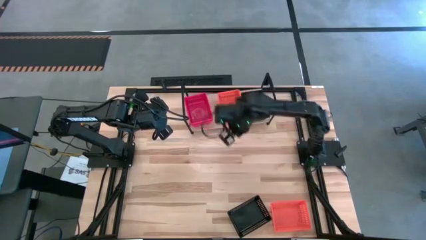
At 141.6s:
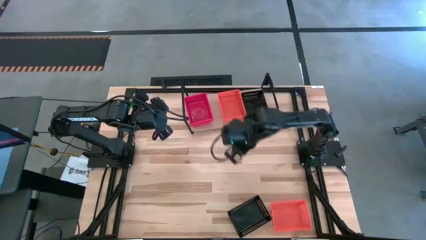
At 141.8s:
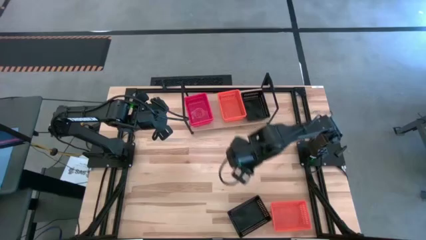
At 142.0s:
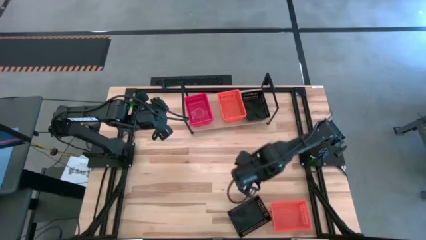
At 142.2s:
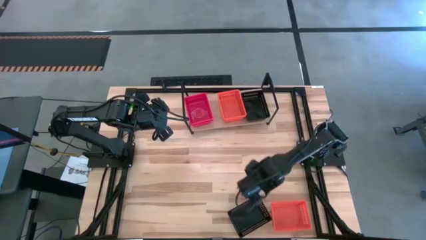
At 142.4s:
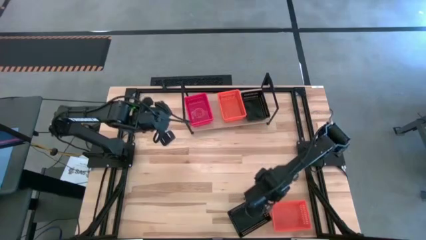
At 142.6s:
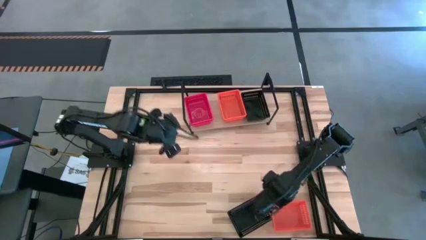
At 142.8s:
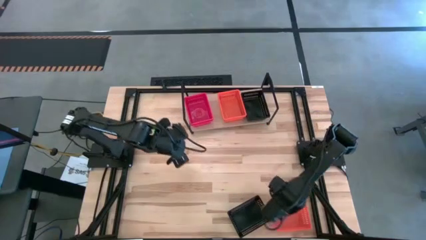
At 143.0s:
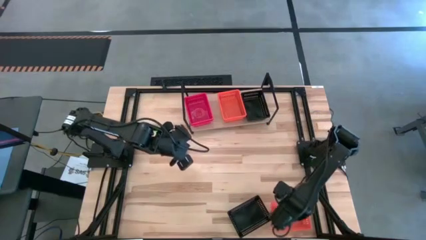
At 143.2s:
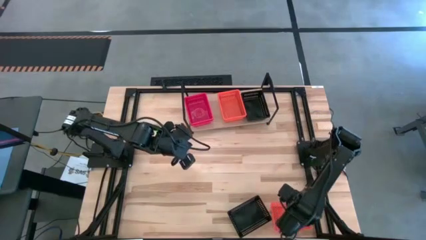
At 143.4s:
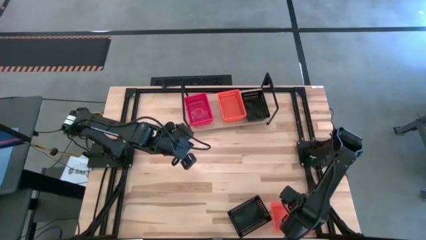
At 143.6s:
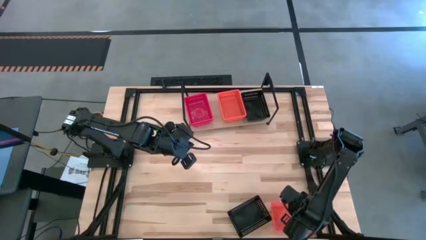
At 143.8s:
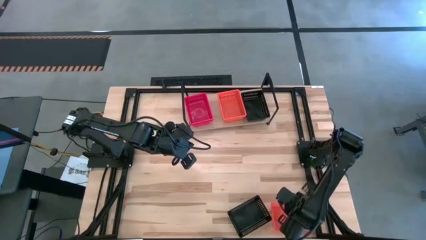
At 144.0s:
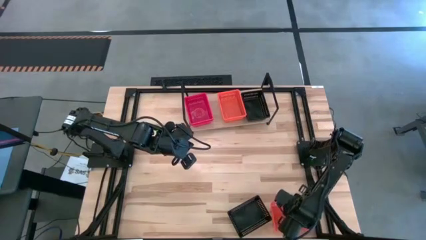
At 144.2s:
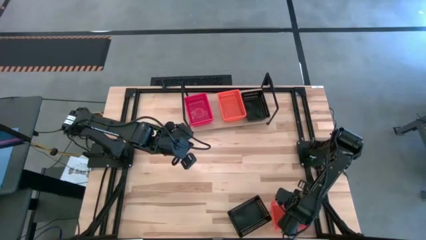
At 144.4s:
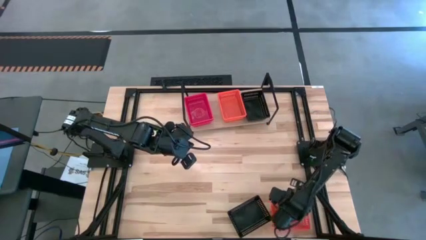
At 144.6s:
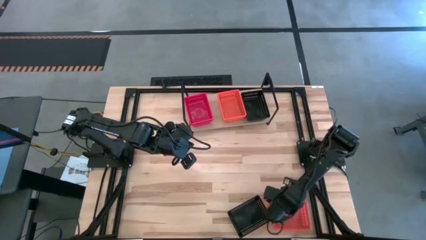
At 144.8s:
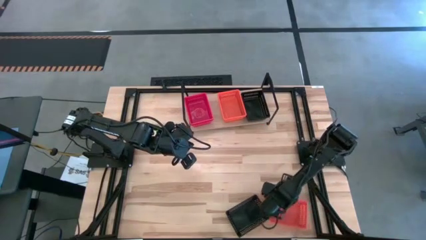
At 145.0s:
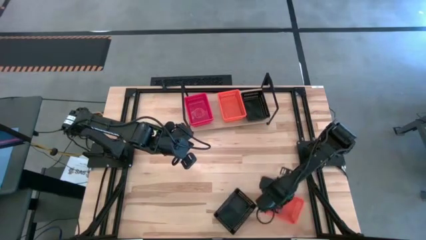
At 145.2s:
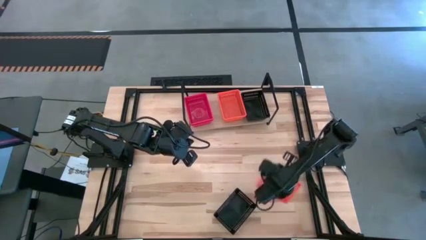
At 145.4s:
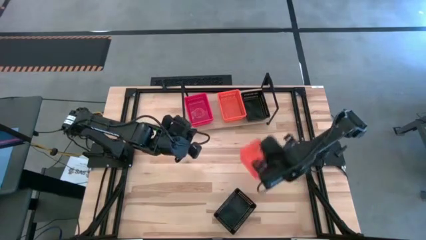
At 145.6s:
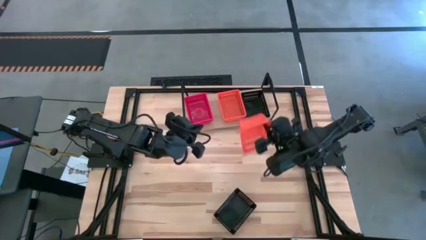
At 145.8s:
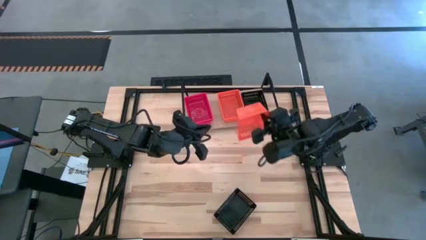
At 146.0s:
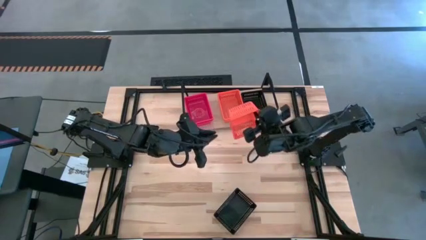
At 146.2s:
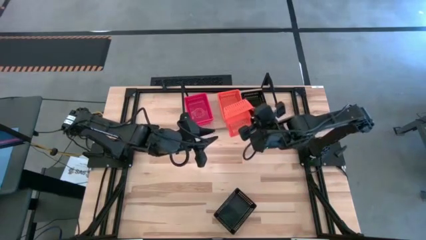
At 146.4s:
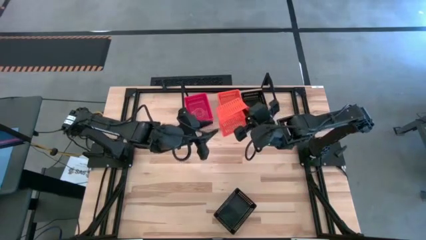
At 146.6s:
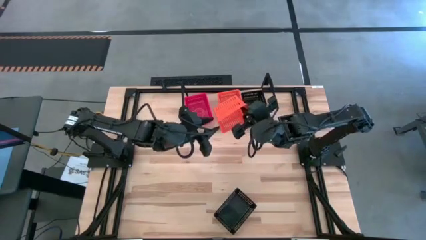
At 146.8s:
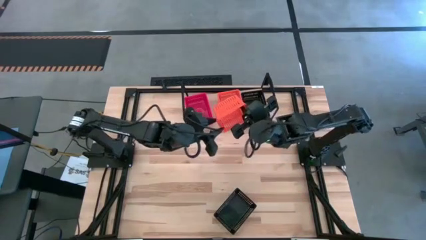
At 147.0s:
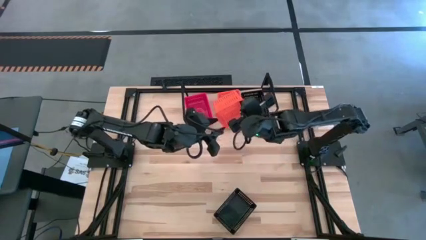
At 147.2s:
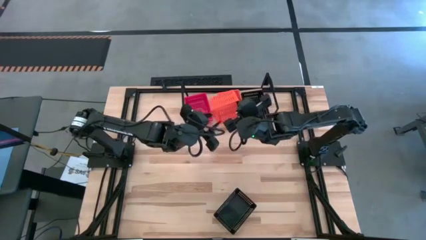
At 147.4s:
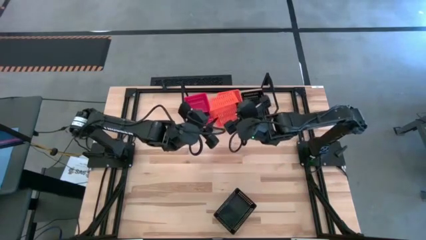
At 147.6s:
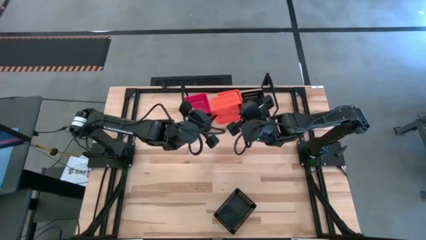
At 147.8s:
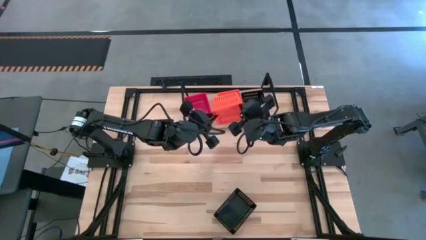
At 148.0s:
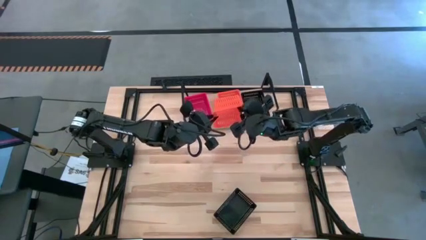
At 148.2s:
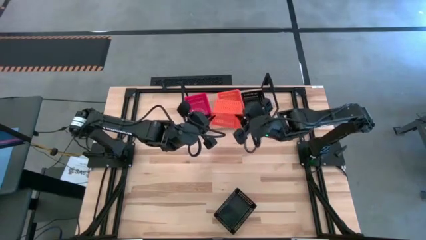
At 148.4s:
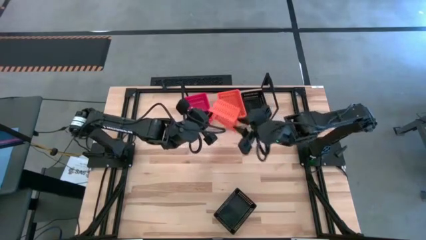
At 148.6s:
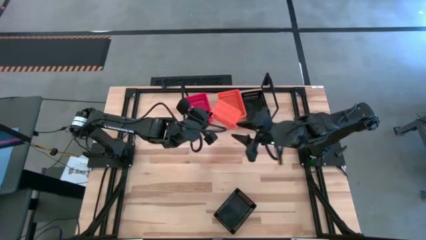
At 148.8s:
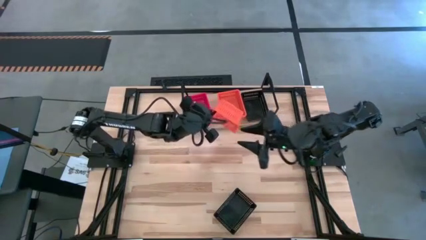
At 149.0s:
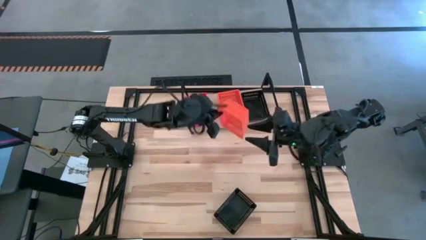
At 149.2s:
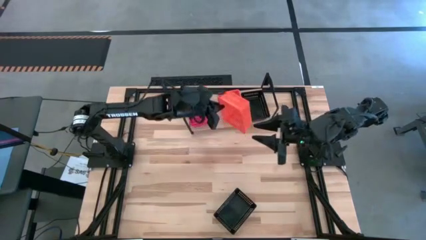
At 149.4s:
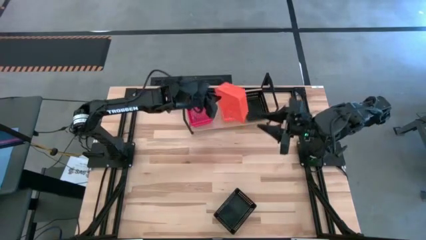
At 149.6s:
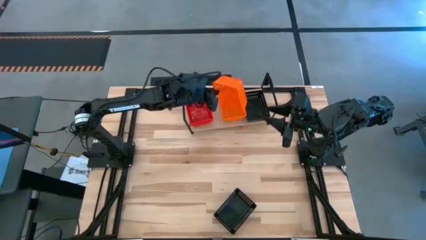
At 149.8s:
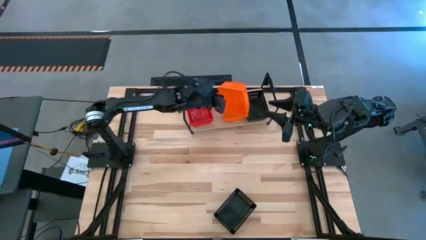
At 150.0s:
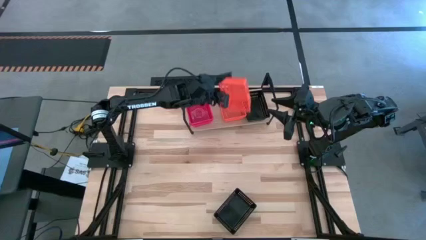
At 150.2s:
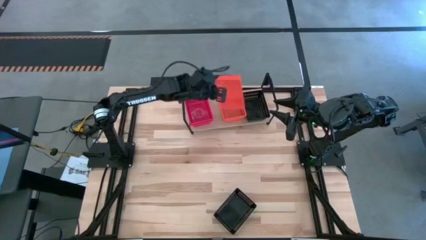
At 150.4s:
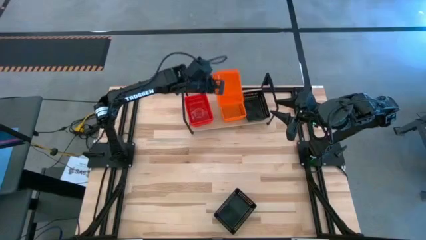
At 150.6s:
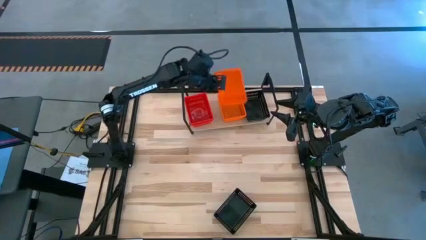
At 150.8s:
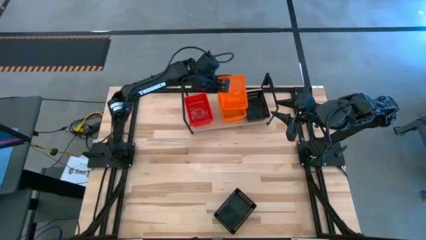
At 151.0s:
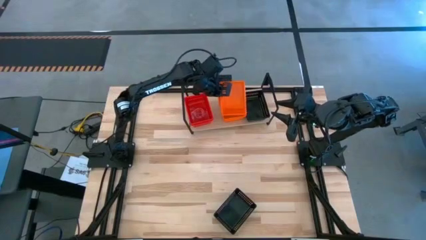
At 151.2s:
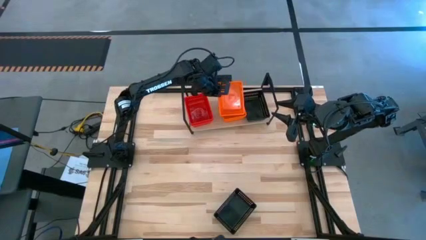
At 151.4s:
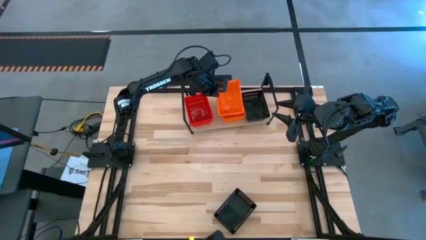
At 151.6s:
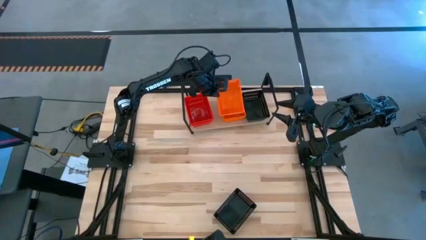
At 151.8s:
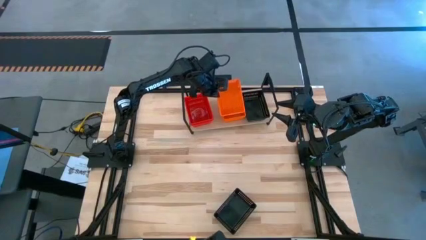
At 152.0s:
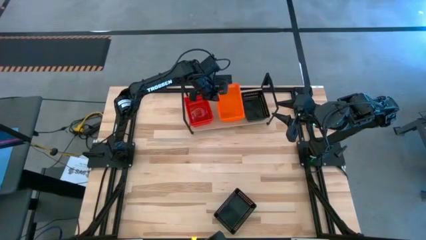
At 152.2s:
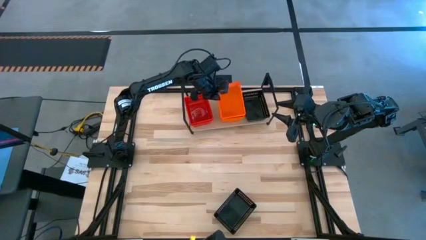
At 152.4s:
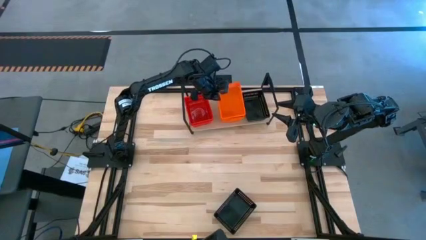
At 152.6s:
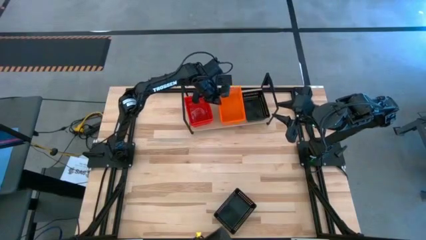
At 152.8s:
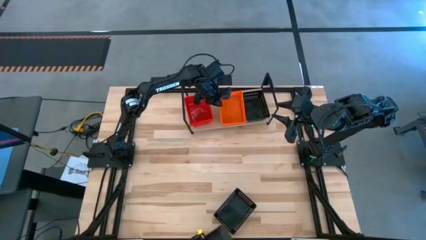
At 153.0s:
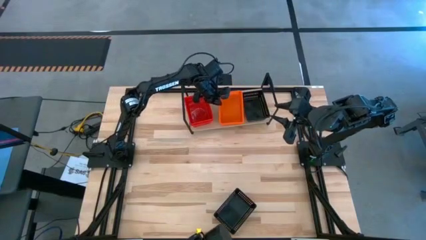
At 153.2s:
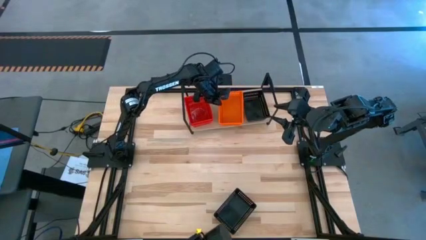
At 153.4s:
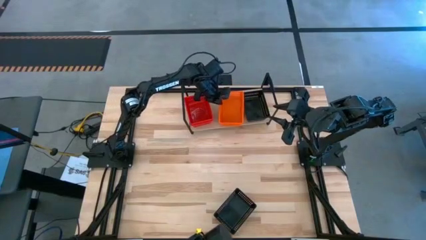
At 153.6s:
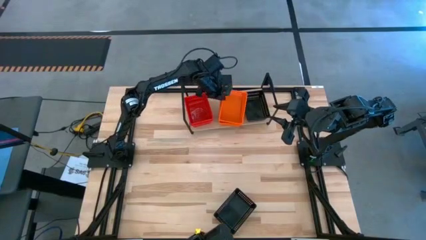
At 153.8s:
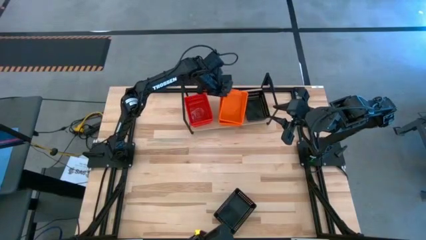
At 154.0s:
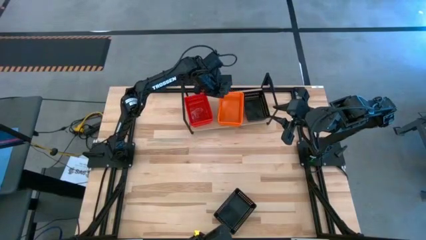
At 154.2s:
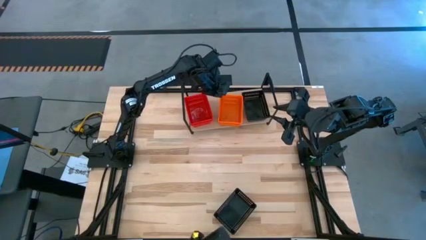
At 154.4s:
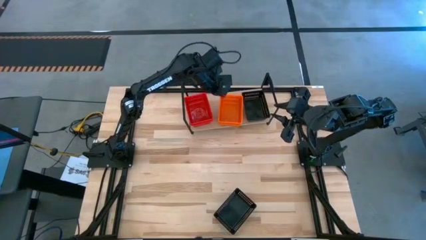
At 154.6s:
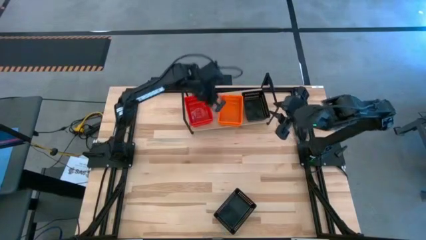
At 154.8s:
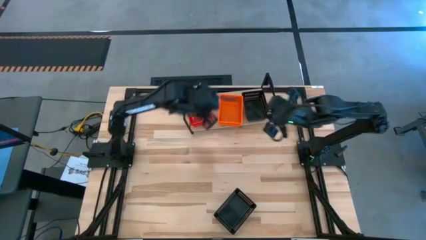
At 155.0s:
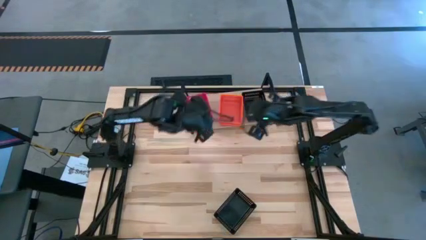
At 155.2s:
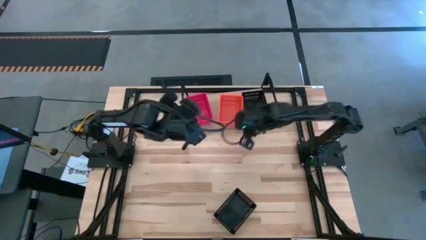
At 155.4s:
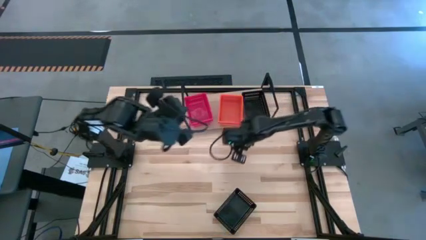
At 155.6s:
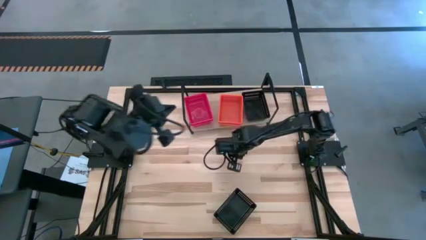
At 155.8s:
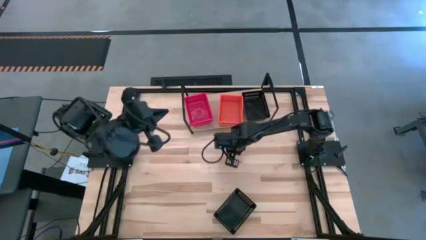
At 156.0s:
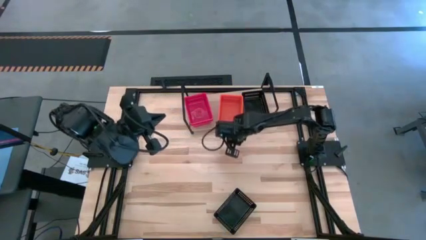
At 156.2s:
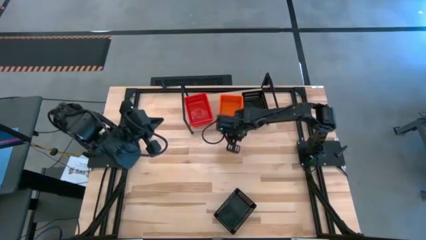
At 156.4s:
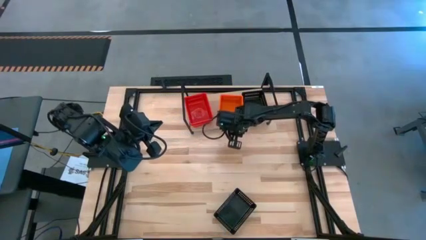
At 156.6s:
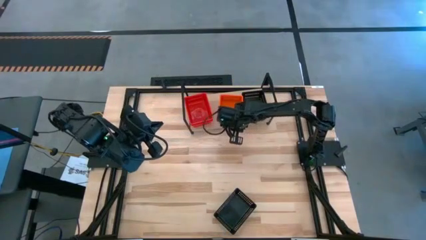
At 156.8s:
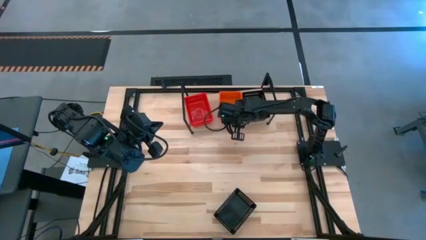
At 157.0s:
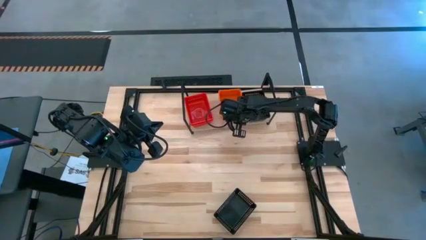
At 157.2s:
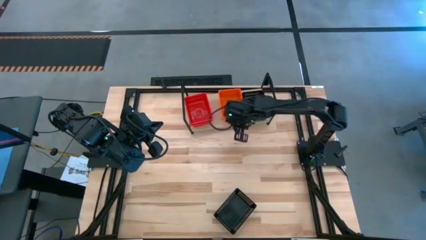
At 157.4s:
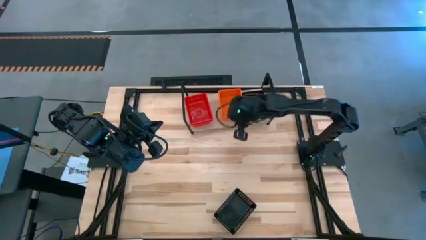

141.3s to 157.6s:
Task: Stack baskets on shelf by color
Stack the orange bin into the orange bin on the shelf
